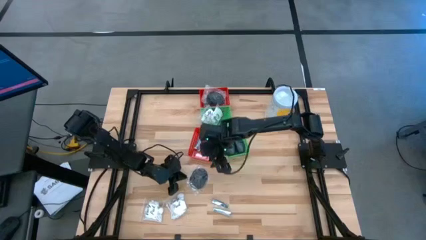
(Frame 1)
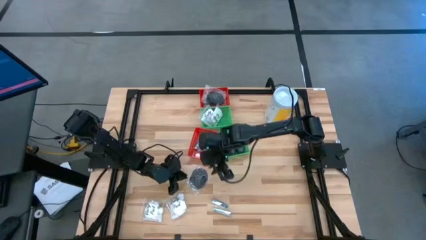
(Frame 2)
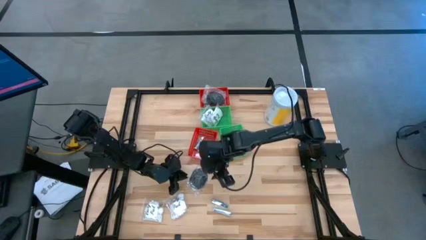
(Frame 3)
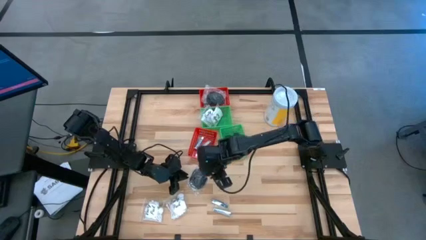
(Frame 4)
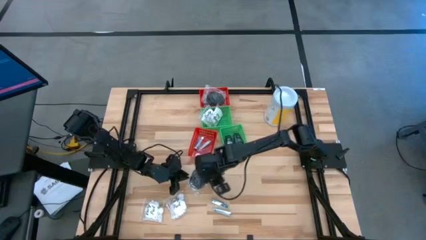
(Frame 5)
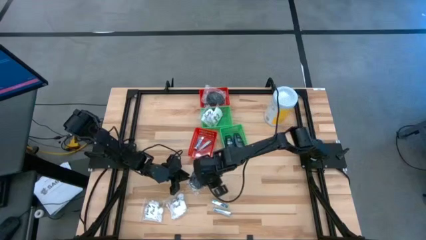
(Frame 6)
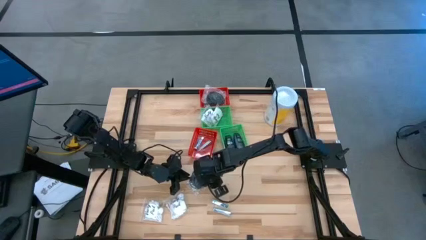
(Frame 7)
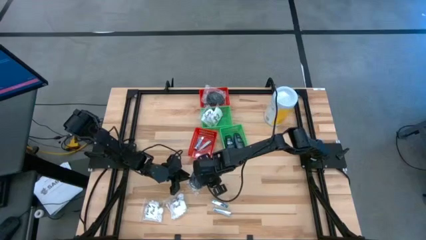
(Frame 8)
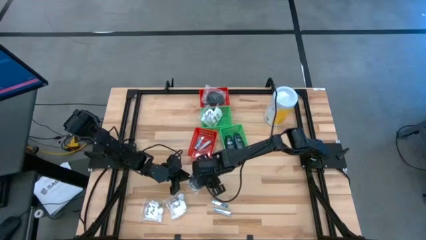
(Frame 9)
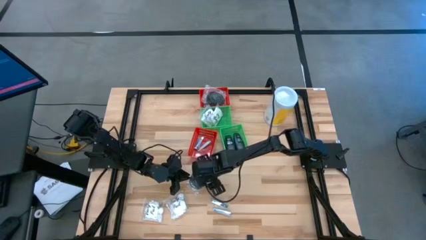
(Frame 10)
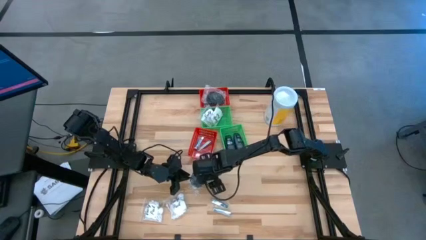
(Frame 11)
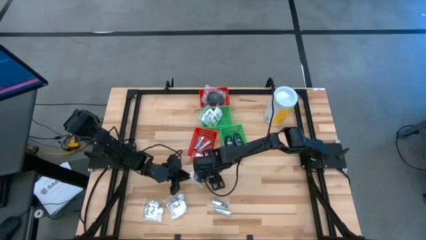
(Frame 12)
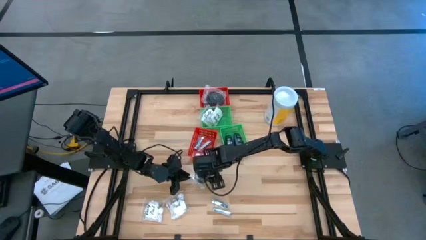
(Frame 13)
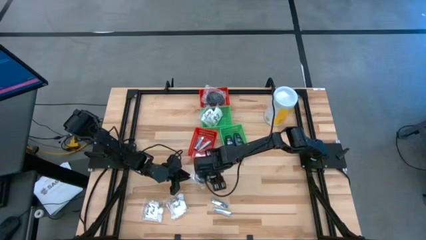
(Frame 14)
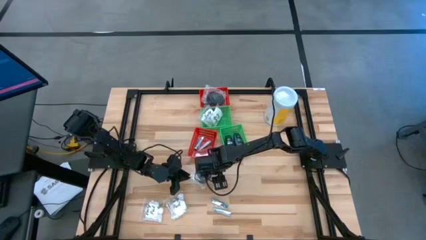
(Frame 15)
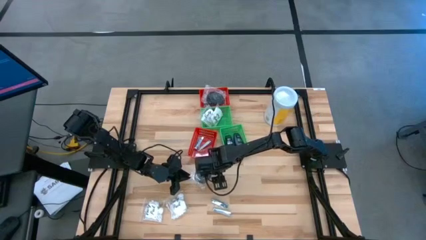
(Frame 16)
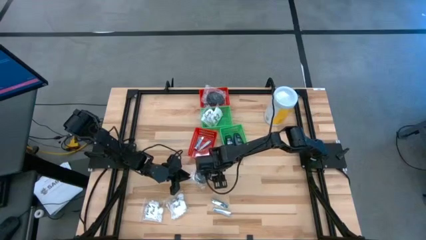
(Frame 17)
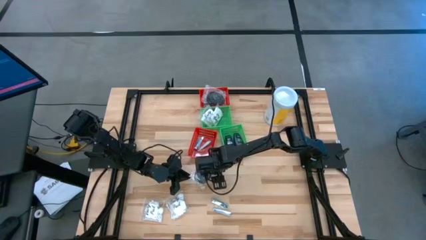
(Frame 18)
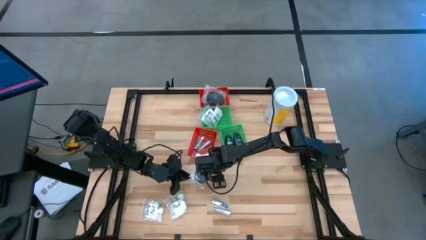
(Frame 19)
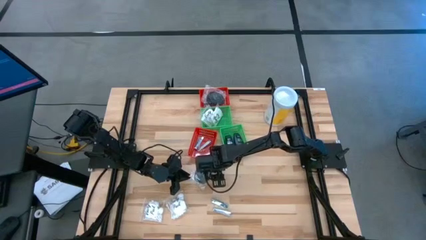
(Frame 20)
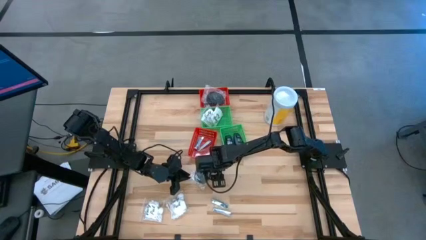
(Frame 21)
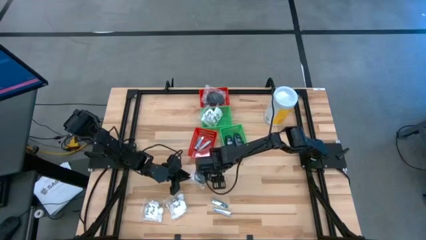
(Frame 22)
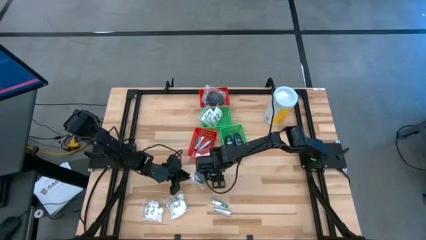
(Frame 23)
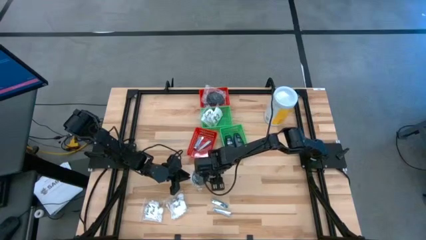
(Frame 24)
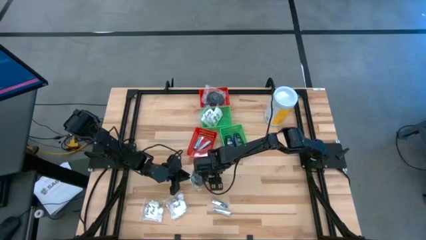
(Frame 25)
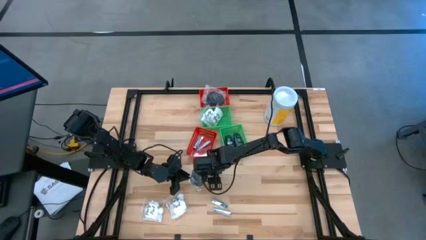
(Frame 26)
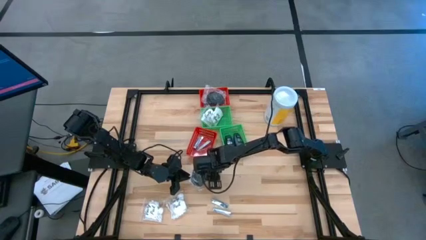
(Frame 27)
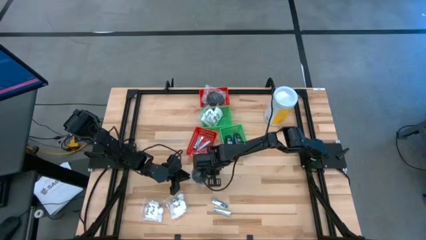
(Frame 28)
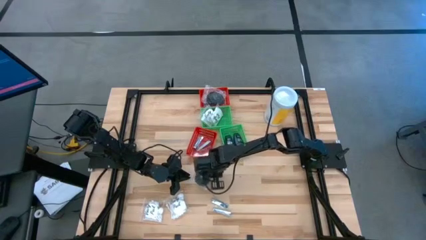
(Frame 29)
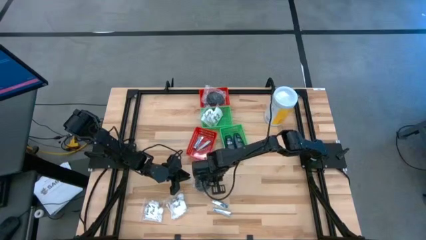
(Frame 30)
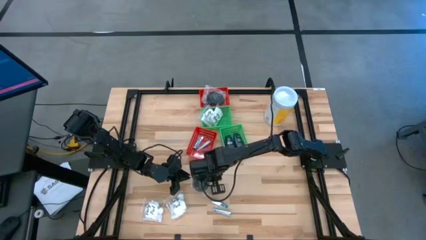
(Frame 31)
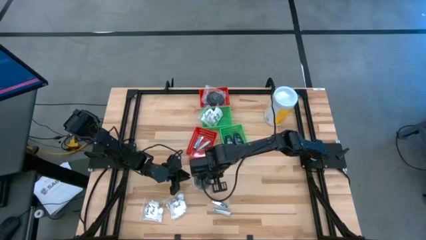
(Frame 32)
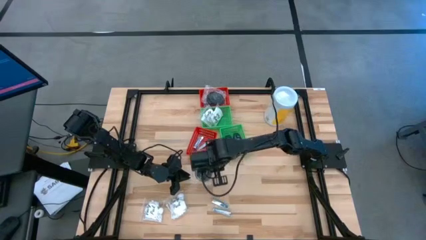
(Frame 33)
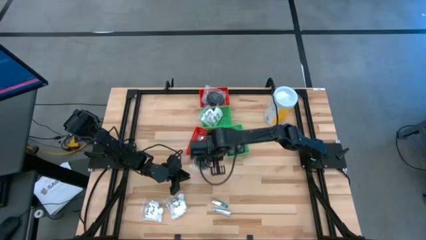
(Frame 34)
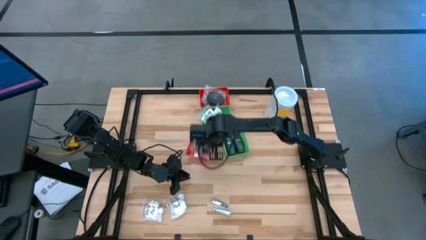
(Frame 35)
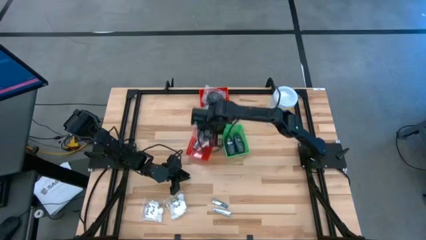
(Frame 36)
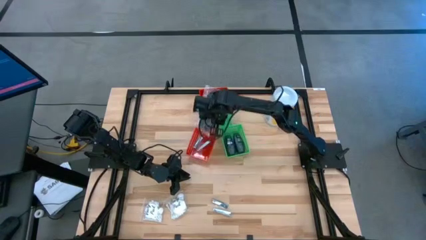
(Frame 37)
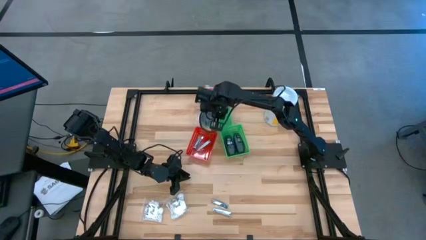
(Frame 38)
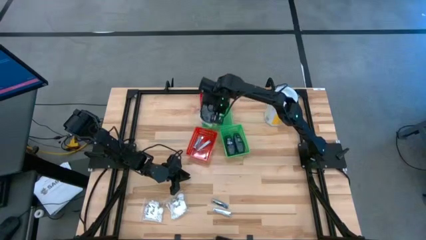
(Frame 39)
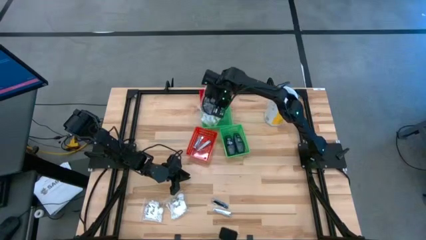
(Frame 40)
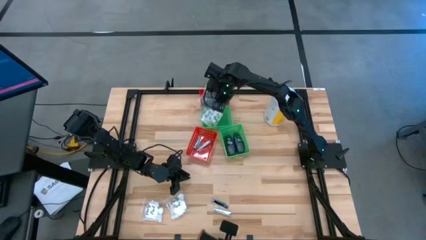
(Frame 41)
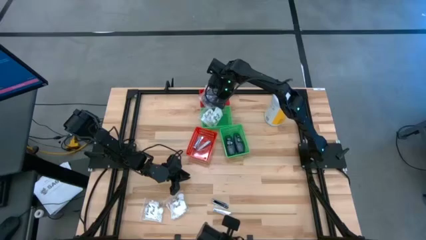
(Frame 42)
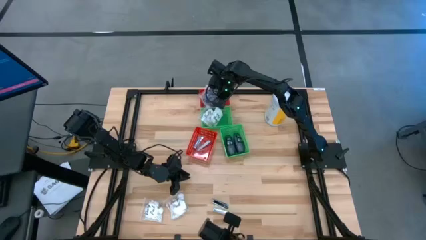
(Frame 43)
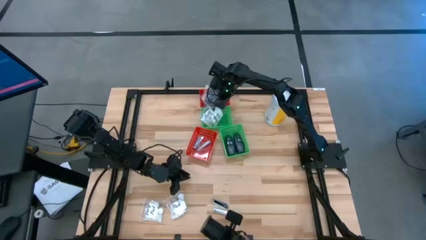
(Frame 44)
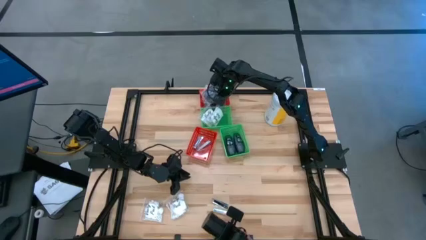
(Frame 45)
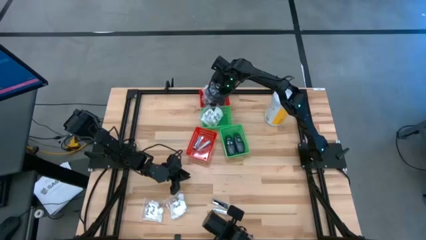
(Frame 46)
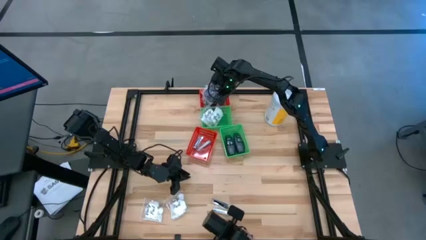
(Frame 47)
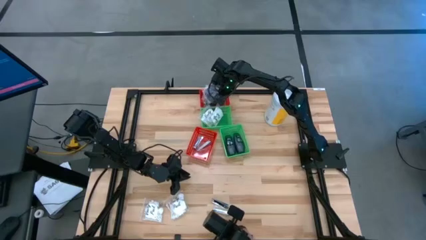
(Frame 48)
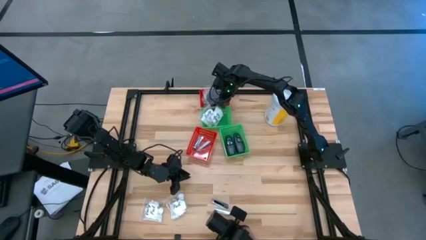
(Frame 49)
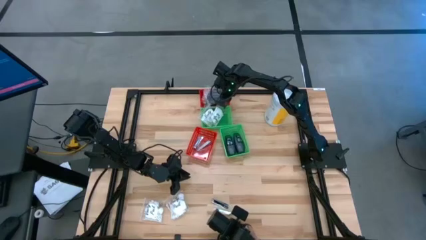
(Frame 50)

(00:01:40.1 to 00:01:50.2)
Task: Pick & Place Travel size toiletries
Put the black hairbrush into the top red bin

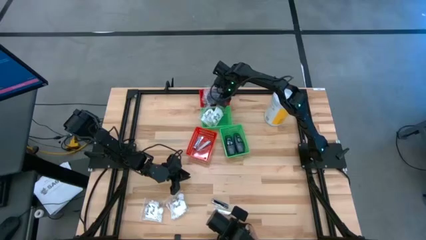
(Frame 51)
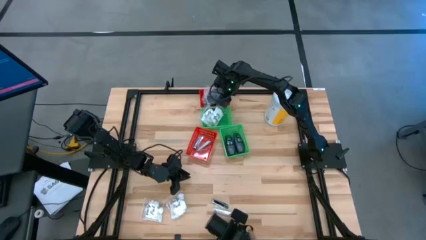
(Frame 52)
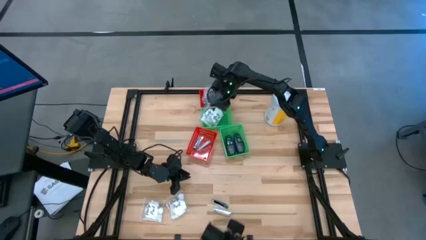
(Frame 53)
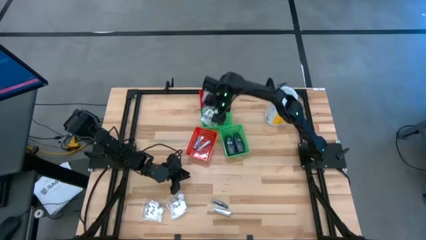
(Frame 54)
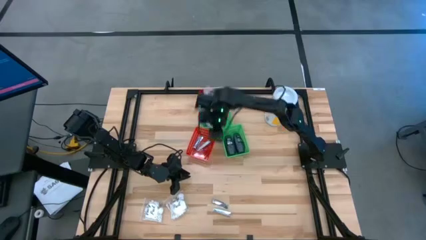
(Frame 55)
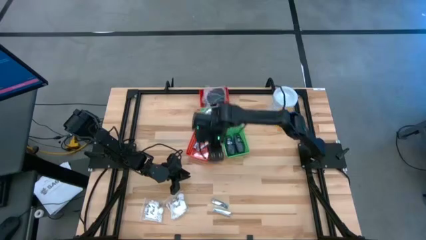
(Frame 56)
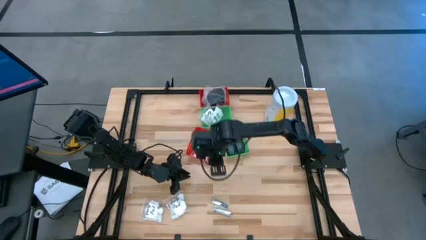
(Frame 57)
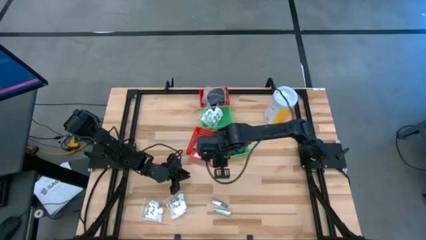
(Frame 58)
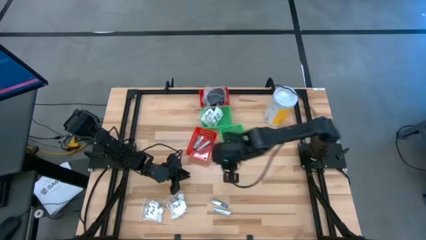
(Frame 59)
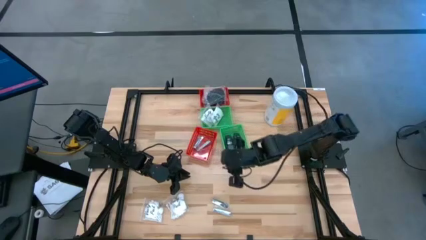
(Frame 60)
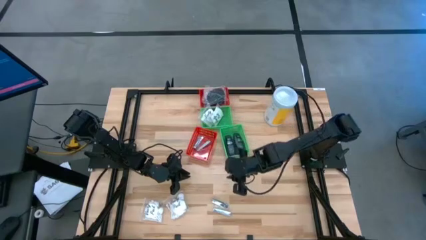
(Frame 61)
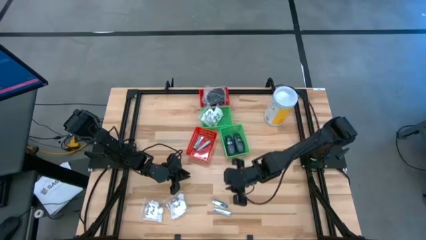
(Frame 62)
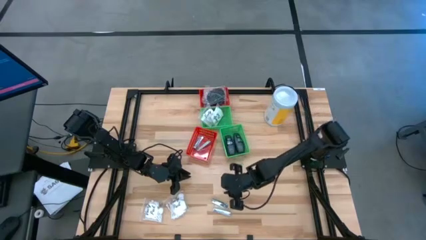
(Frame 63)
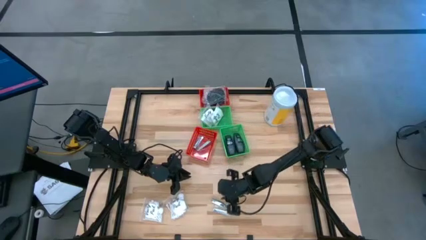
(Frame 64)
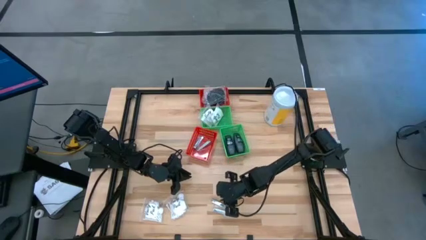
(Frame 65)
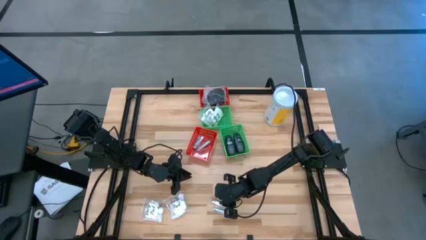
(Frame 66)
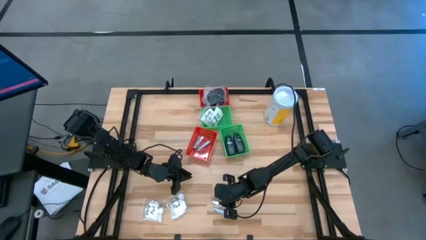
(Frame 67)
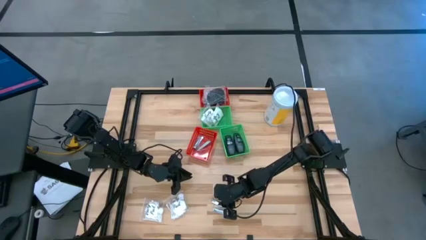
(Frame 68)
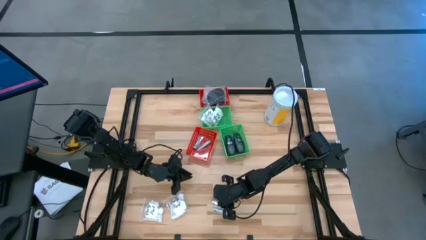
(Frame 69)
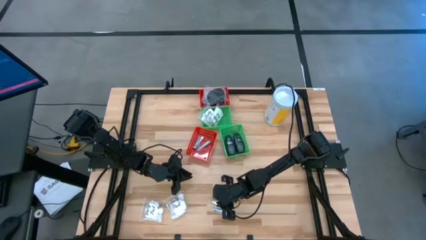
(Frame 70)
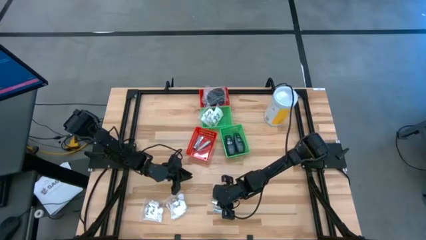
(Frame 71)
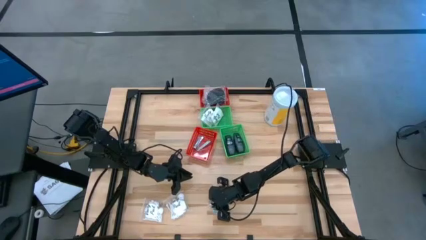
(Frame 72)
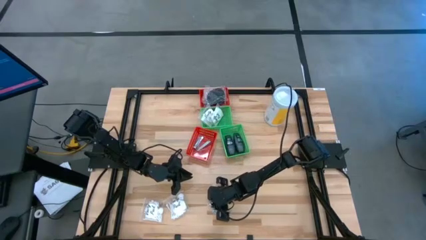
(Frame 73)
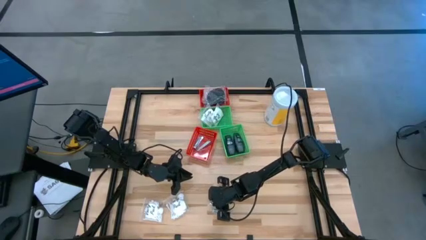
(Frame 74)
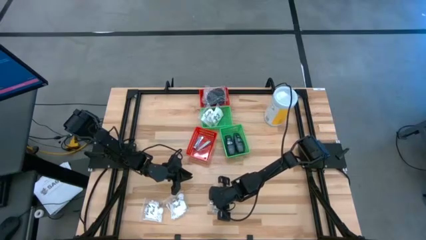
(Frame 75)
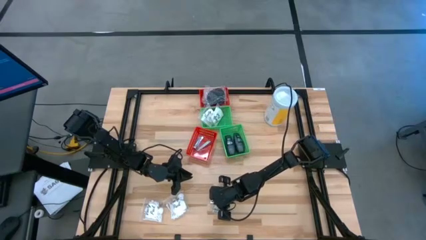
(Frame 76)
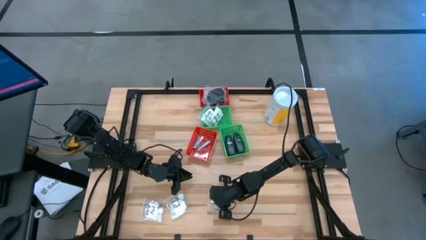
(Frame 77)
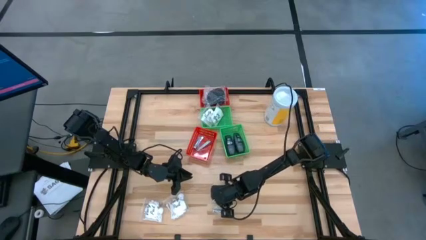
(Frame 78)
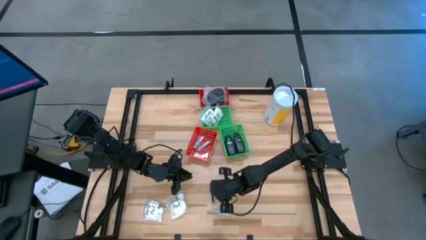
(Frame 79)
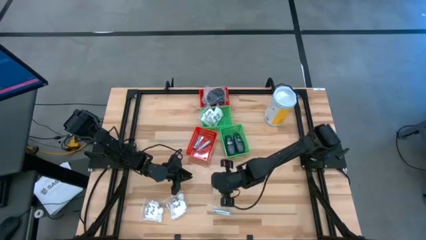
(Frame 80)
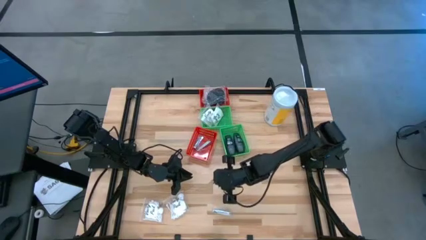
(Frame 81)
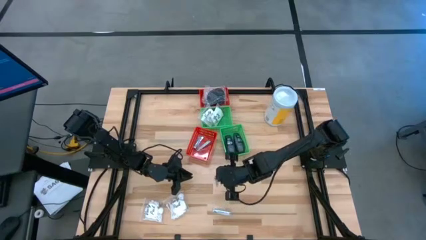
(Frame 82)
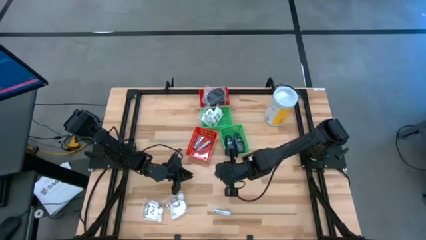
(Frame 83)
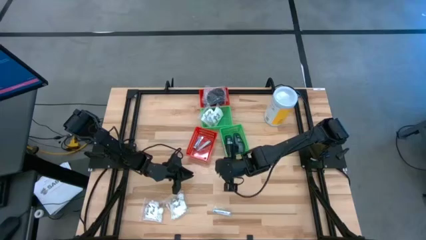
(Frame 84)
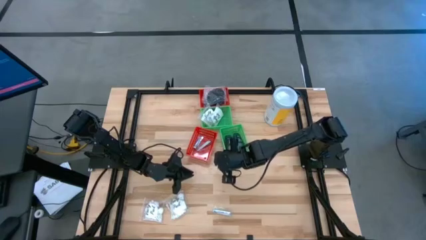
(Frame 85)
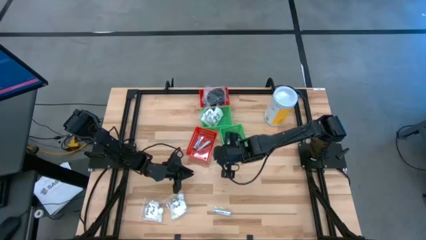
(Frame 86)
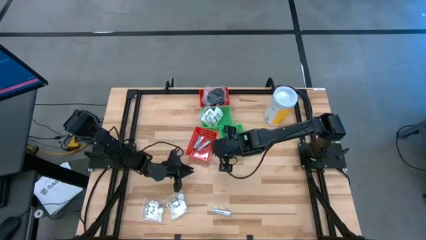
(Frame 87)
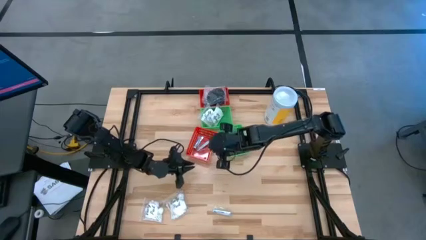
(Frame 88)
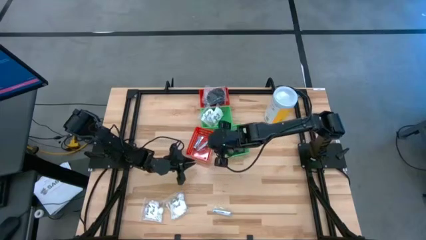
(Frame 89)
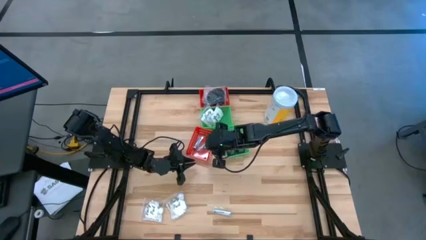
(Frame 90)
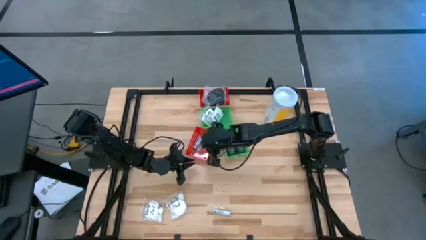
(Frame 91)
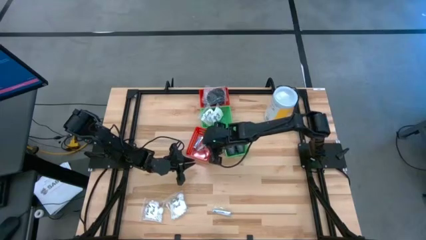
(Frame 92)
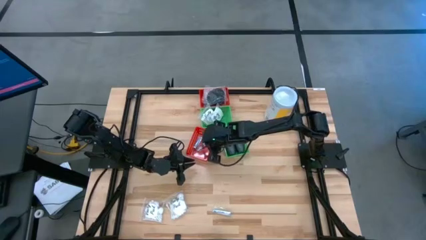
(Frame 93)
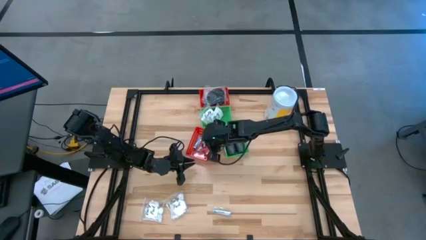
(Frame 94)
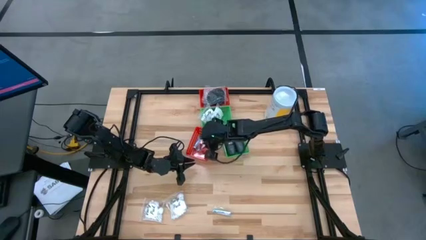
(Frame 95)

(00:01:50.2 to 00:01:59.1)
Put the silver nail cutter into the bottom red bin
